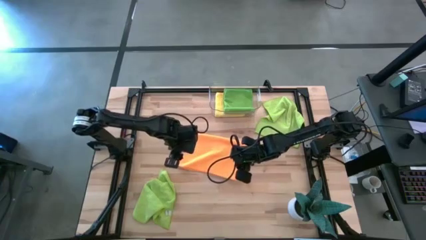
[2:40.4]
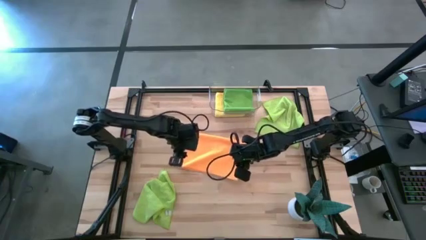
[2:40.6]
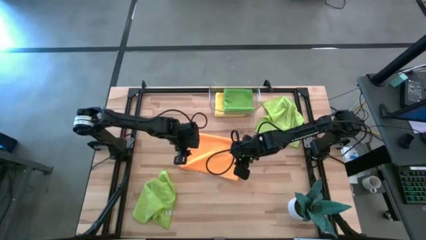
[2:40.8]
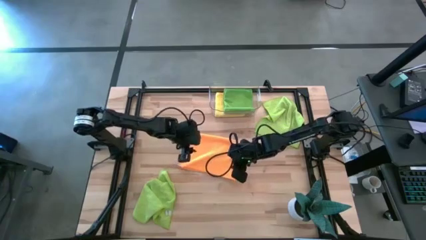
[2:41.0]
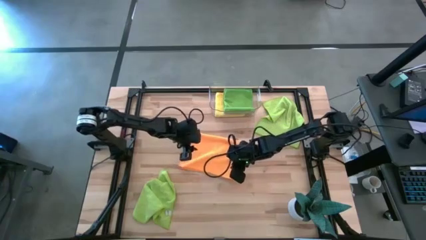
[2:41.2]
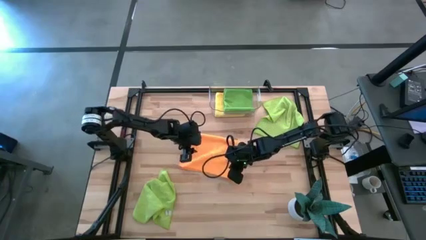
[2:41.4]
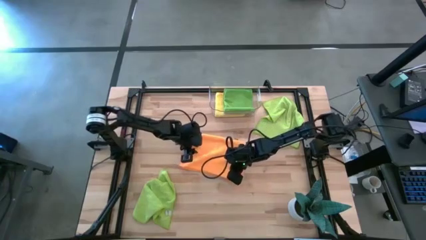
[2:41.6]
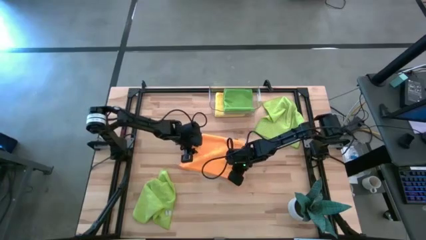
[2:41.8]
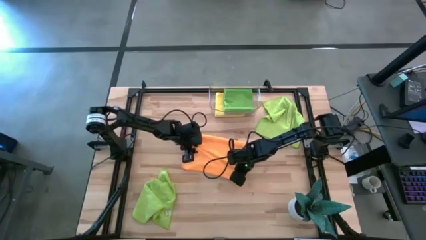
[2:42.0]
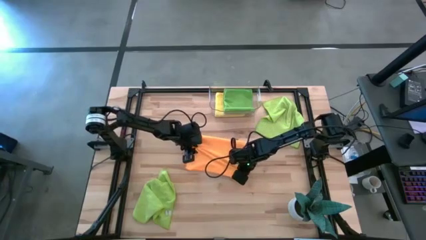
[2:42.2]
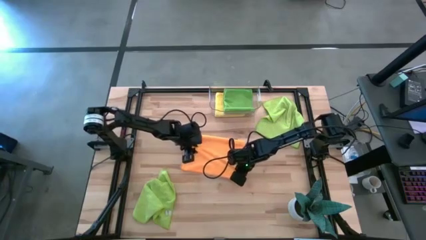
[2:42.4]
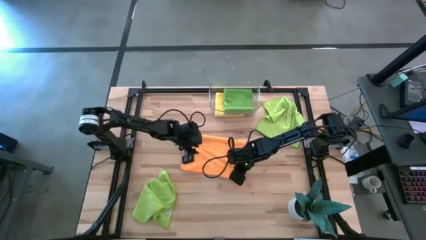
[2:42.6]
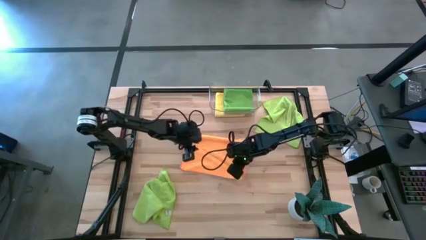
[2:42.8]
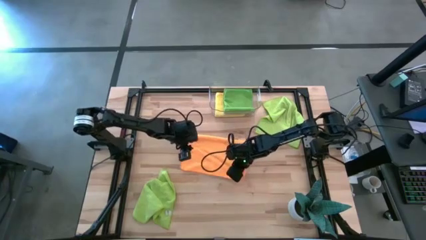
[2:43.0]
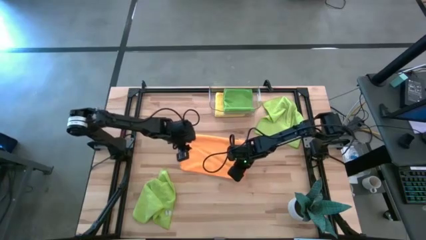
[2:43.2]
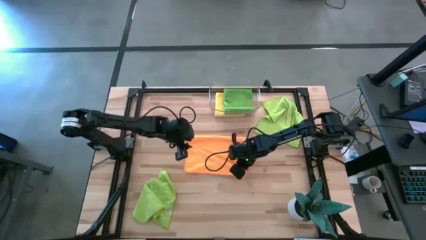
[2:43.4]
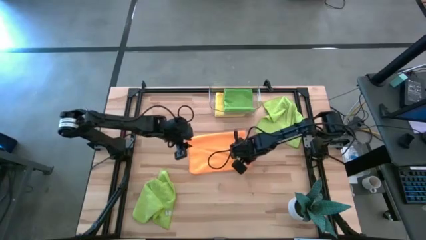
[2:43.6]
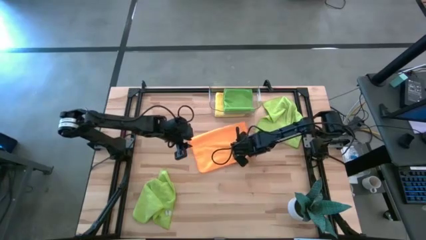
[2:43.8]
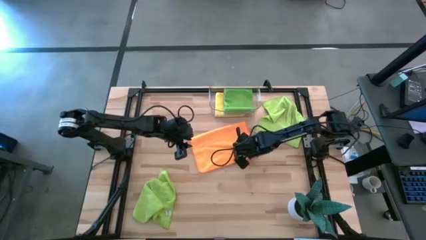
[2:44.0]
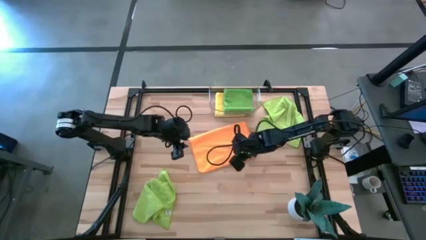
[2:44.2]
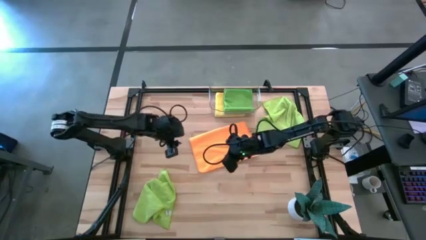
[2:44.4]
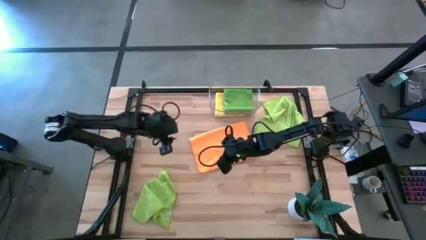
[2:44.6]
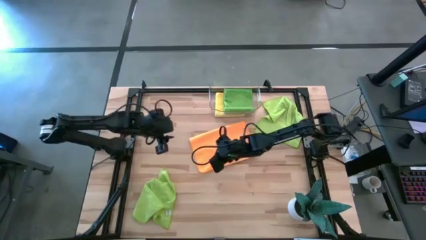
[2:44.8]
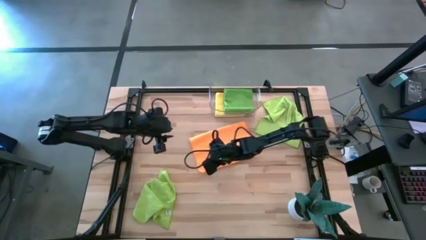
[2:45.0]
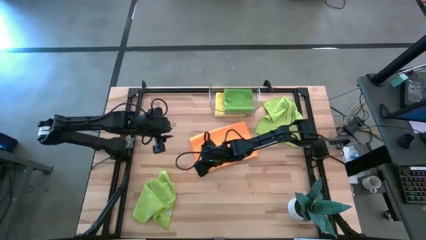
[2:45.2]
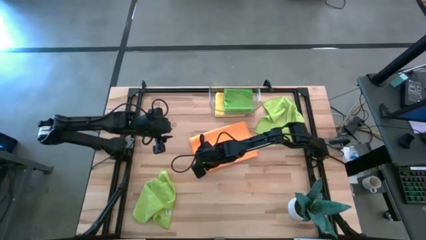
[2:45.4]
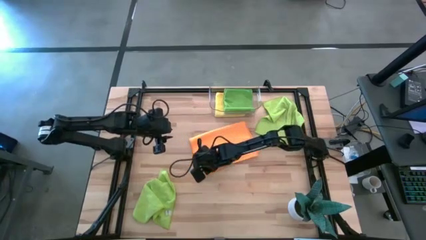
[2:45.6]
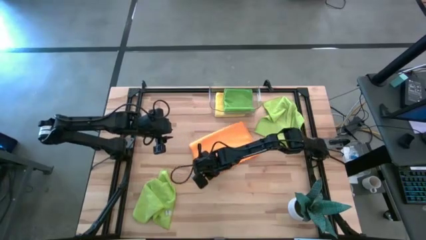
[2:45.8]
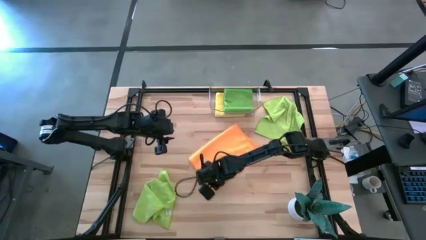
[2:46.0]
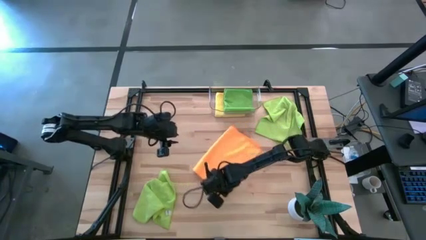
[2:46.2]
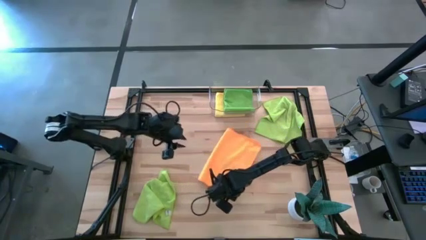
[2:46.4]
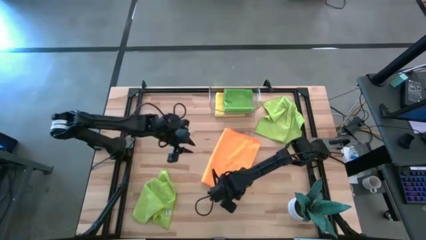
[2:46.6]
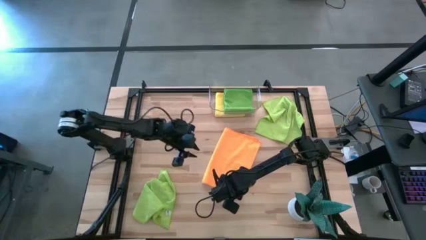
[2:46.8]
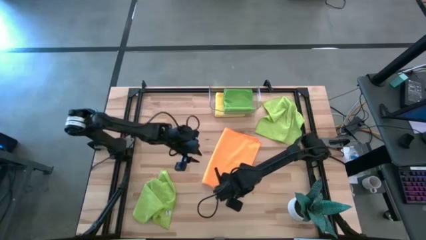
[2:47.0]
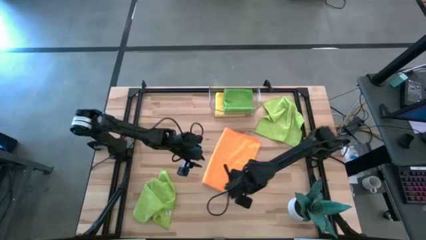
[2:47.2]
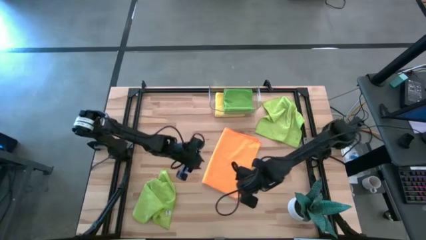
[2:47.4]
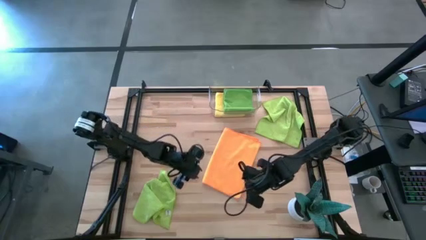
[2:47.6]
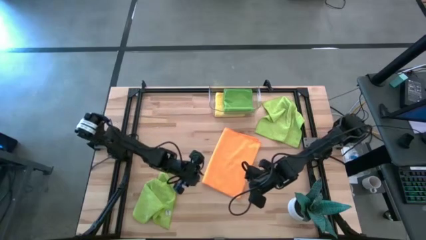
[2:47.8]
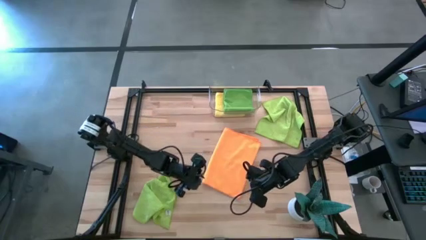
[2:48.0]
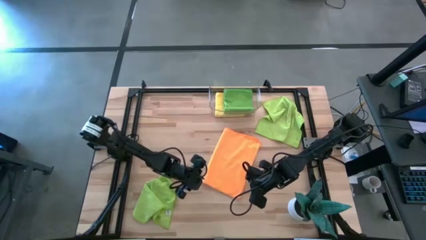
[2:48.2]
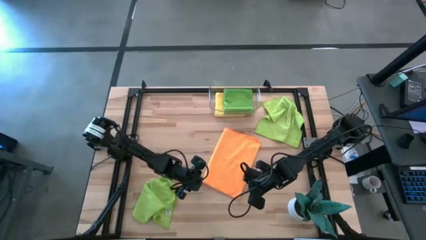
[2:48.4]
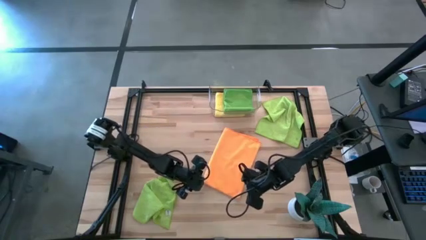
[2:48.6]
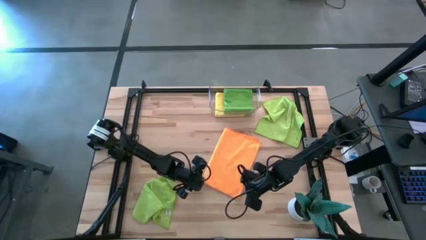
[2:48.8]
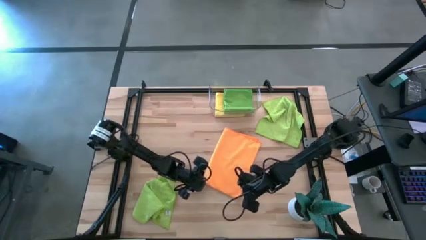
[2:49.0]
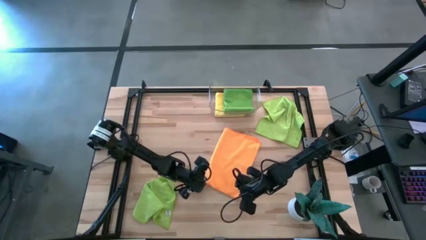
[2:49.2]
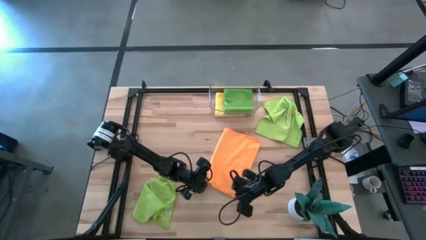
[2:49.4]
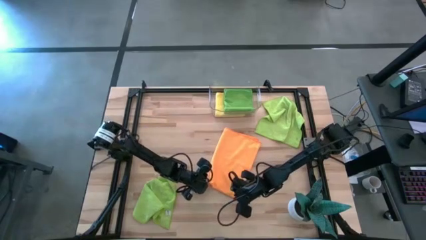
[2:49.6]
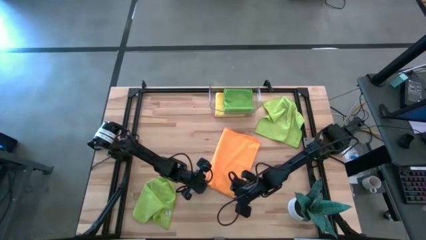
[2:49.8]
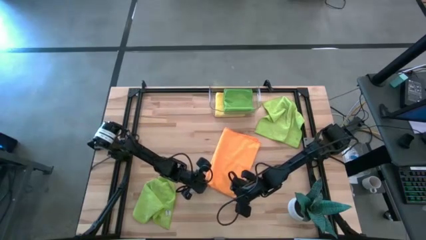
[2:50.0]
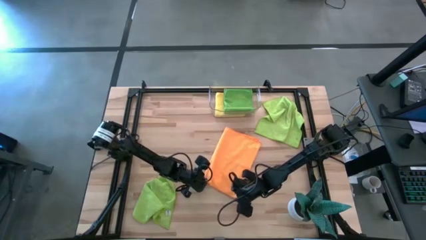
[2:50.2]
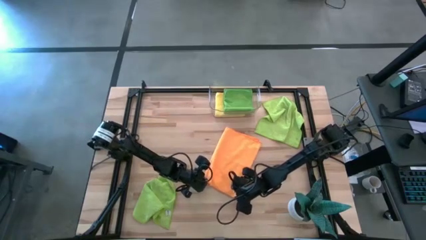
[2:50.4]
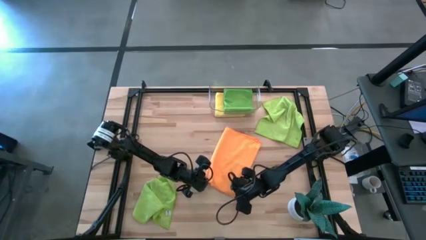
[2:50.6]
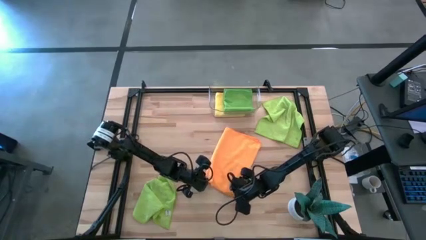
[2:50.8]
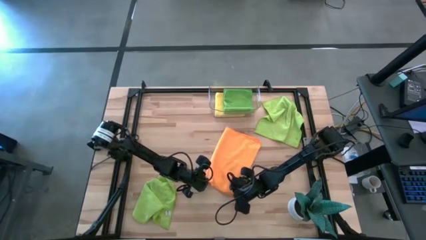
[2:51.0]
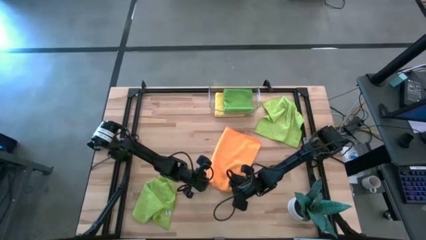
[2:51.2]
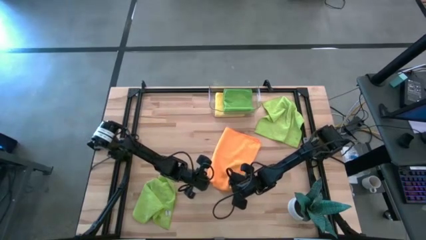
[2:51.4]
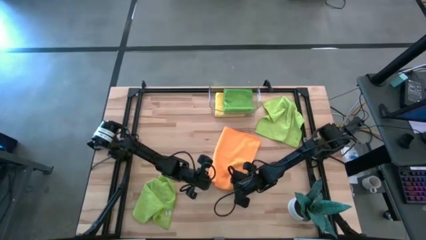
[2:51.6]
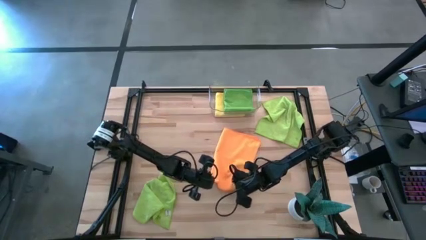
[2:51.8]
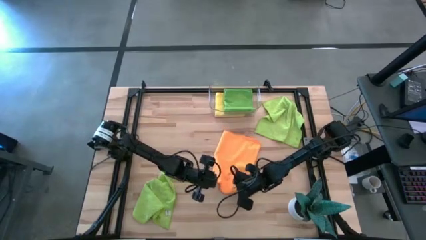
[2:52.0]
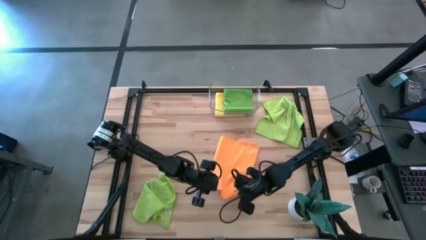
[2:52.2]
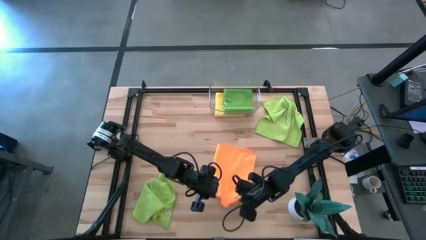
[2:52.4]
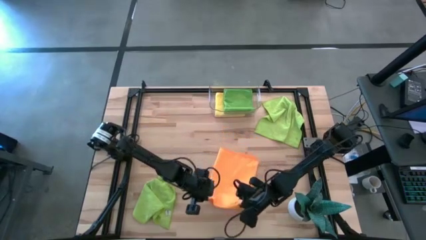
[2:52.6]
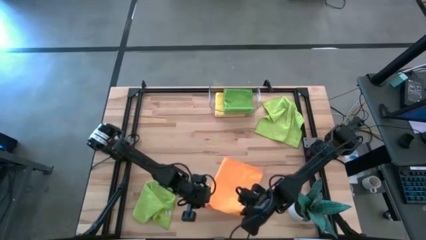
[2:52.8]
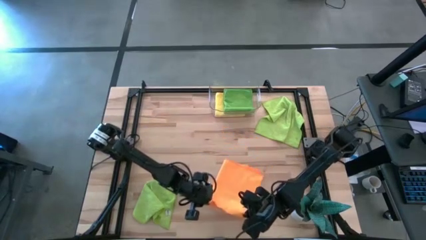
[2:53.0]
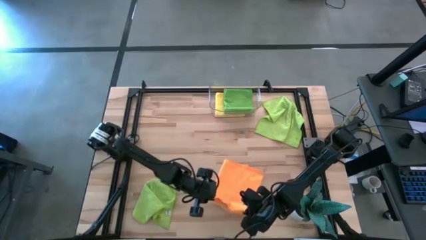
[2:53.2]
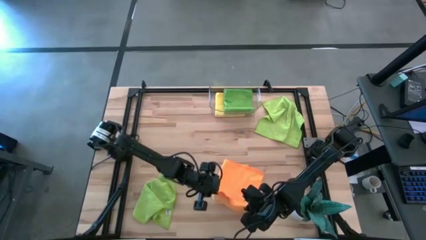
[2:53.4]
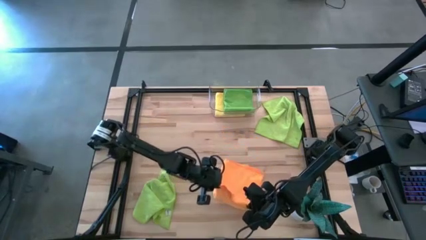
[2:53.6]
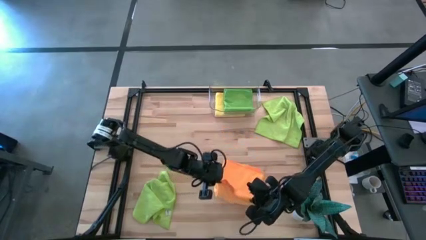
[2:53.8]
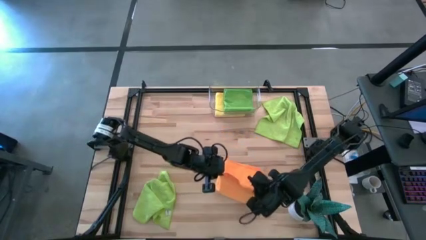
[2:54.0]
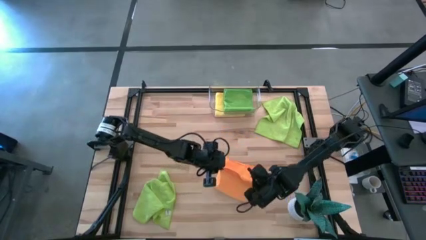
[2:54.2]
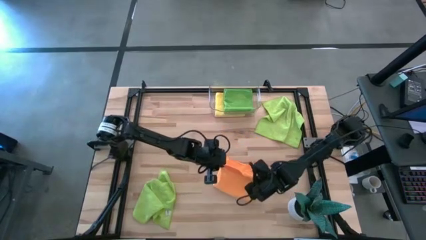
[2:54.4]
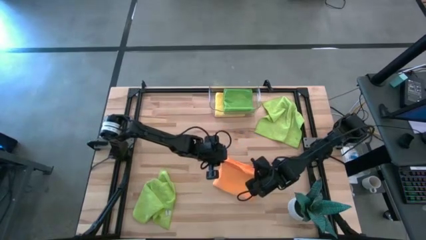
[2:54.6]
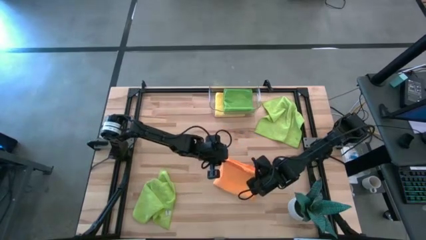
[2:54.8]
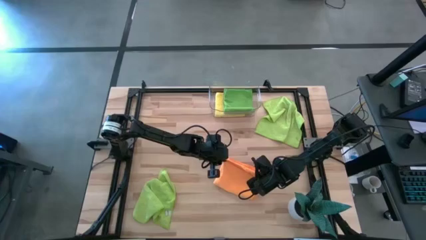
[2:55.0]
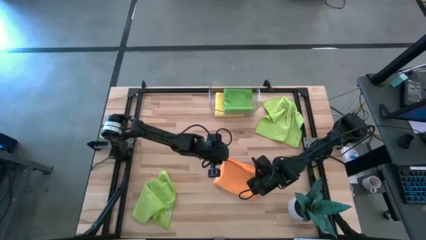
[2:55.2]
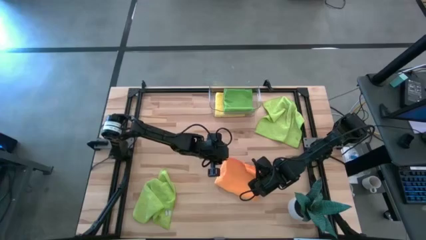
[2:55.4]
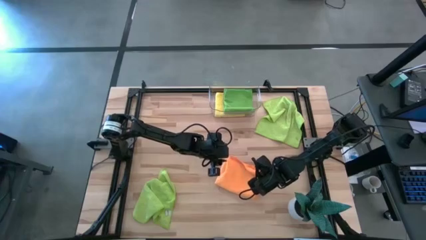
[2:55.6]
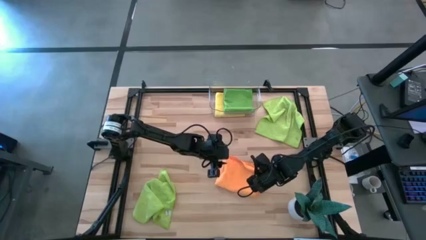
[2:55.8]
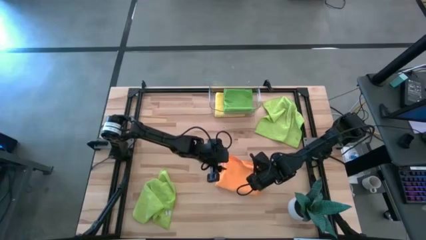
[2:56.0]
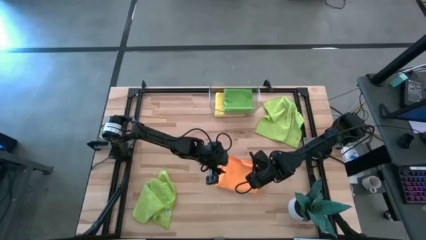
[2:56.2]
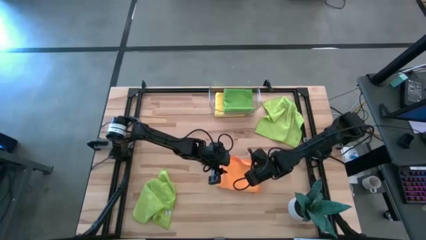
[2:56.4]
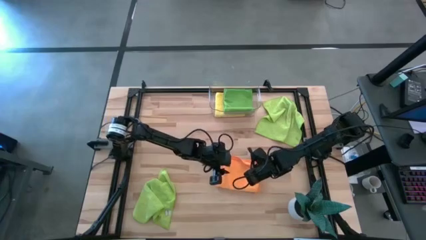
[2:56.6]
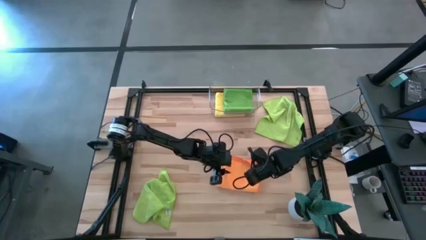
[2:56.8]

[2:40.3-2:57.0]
Task: Fold microfiber towels
Fold the orange microfiber cloth
